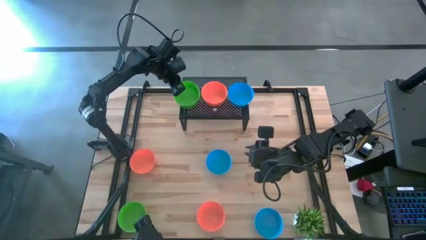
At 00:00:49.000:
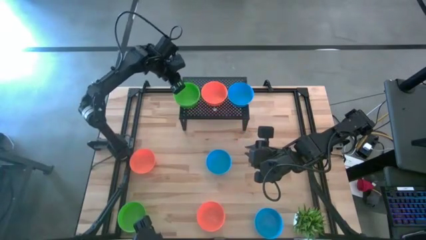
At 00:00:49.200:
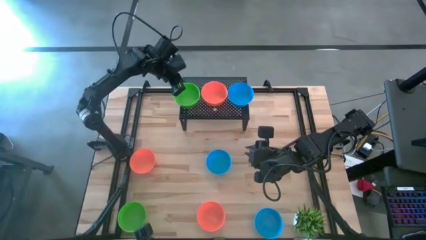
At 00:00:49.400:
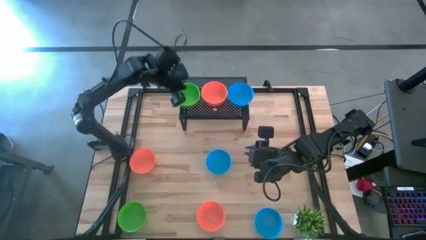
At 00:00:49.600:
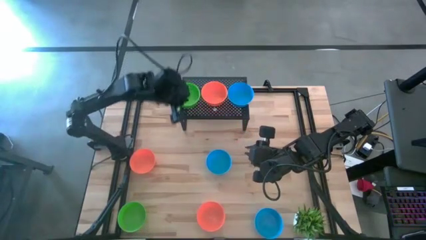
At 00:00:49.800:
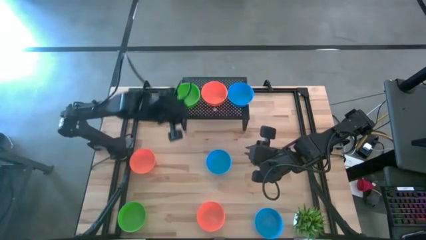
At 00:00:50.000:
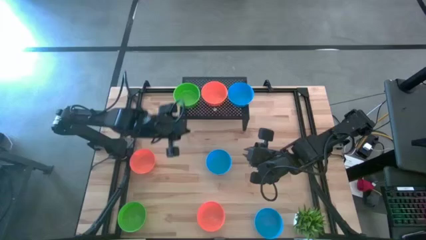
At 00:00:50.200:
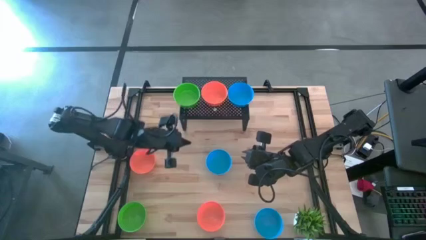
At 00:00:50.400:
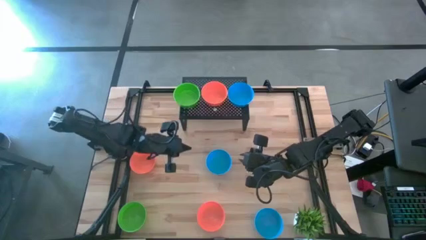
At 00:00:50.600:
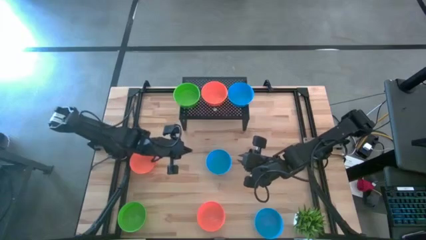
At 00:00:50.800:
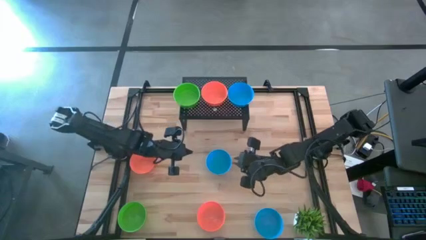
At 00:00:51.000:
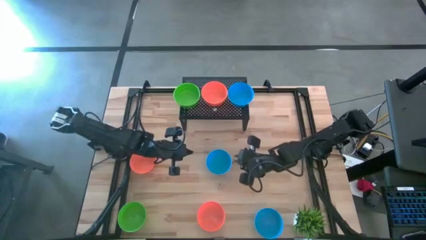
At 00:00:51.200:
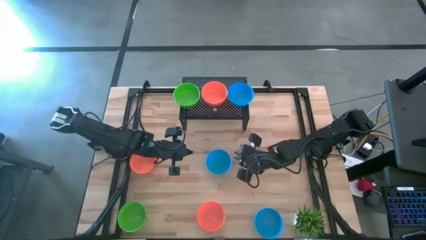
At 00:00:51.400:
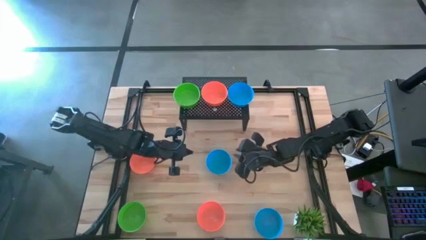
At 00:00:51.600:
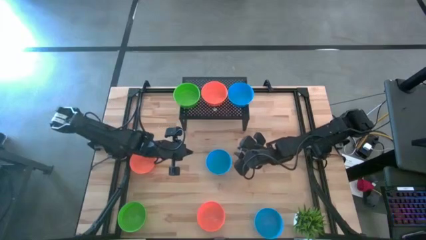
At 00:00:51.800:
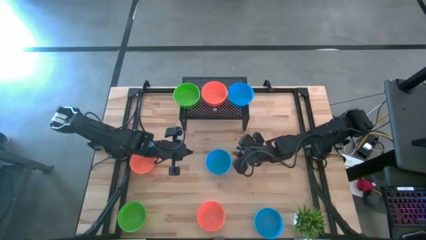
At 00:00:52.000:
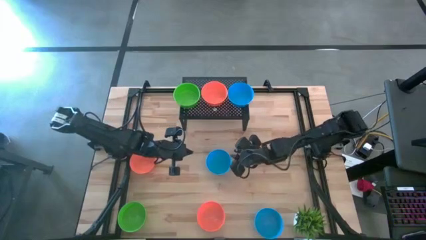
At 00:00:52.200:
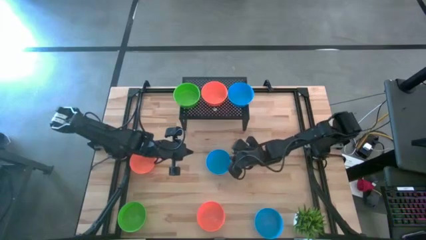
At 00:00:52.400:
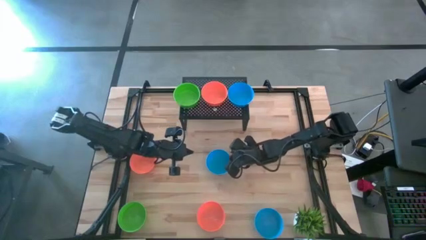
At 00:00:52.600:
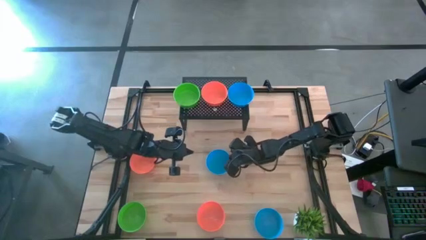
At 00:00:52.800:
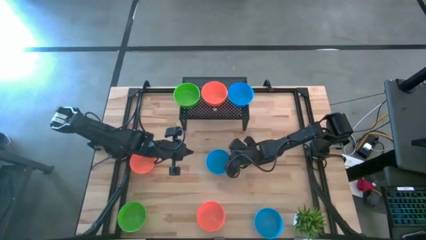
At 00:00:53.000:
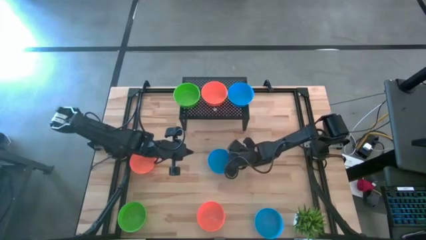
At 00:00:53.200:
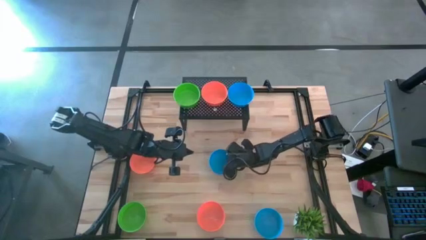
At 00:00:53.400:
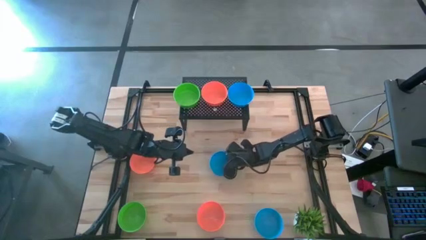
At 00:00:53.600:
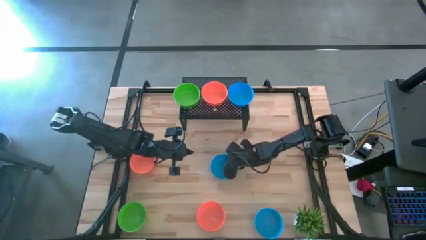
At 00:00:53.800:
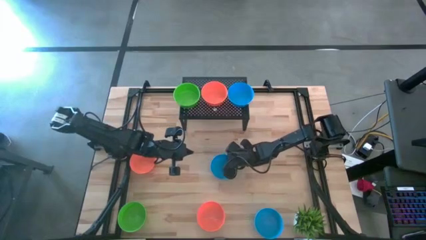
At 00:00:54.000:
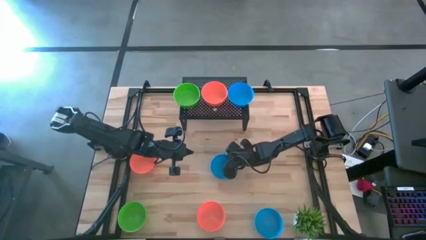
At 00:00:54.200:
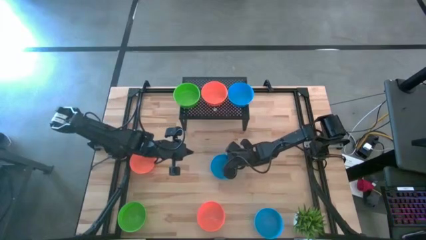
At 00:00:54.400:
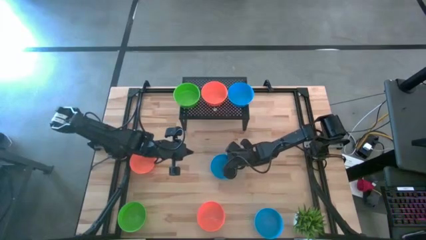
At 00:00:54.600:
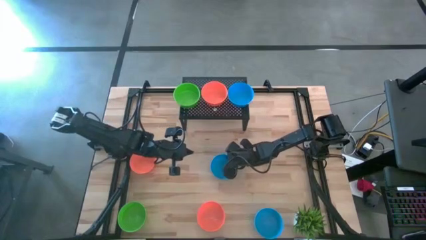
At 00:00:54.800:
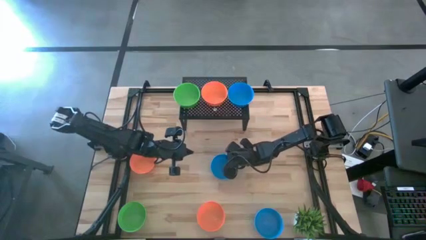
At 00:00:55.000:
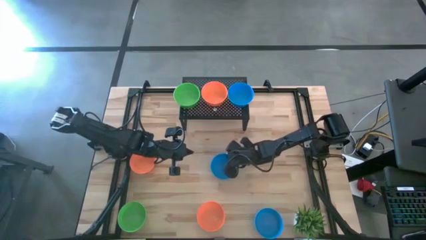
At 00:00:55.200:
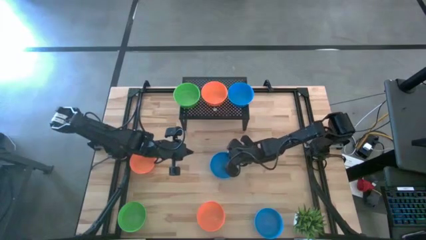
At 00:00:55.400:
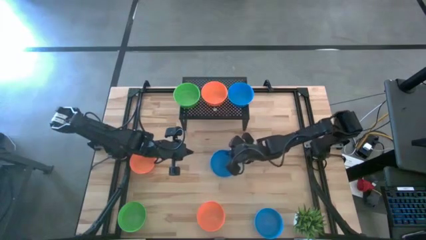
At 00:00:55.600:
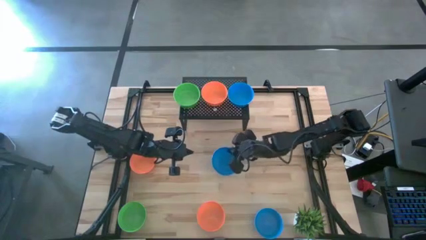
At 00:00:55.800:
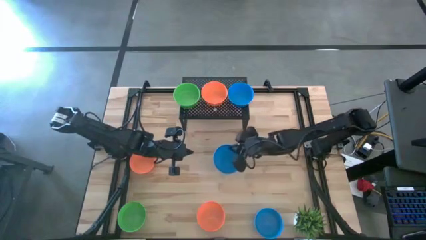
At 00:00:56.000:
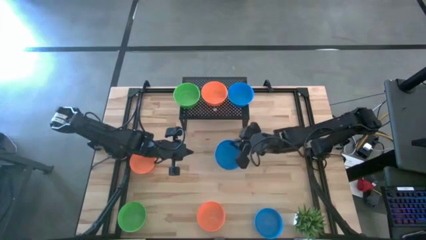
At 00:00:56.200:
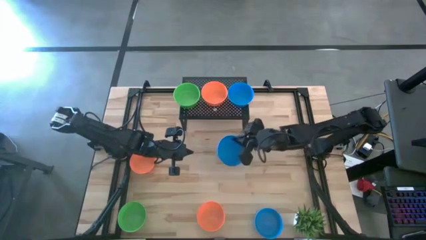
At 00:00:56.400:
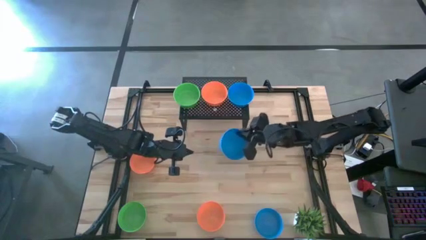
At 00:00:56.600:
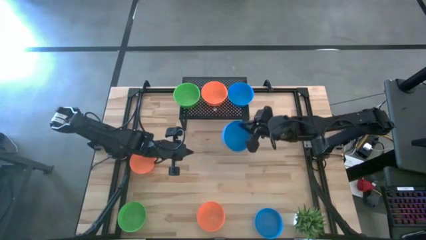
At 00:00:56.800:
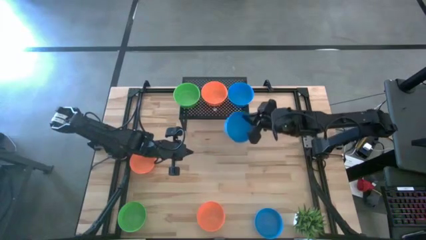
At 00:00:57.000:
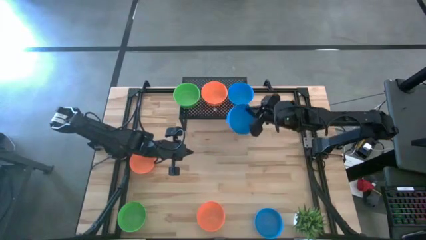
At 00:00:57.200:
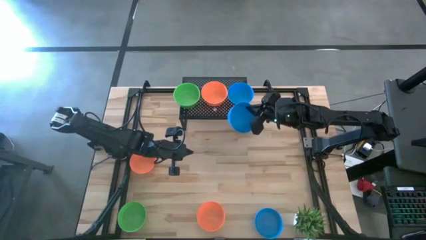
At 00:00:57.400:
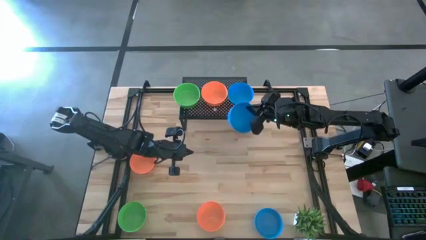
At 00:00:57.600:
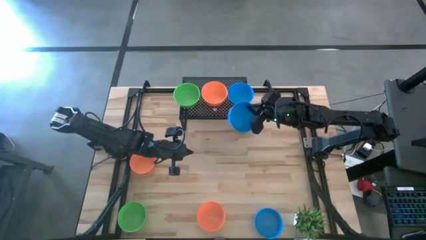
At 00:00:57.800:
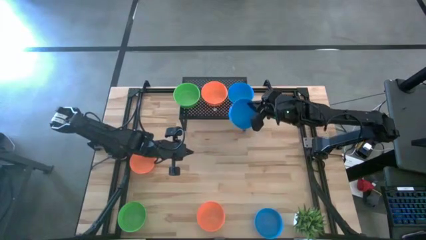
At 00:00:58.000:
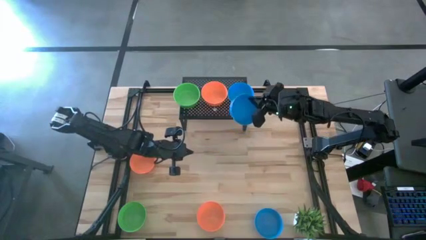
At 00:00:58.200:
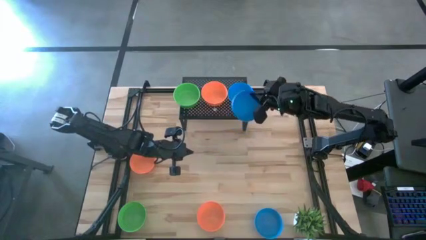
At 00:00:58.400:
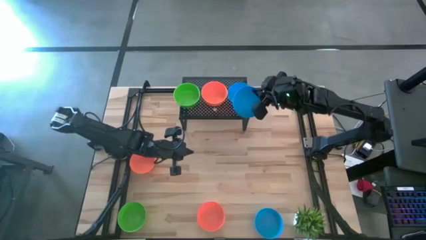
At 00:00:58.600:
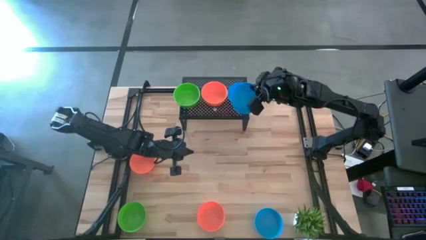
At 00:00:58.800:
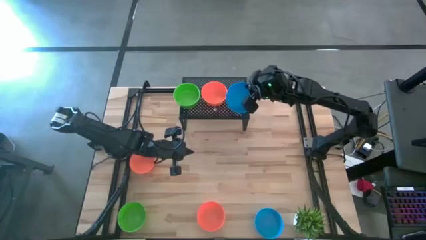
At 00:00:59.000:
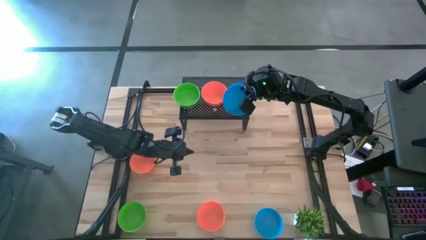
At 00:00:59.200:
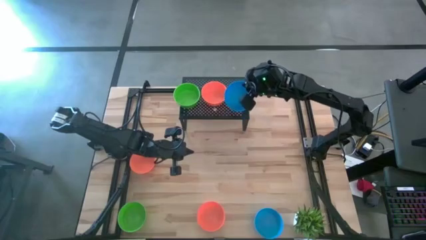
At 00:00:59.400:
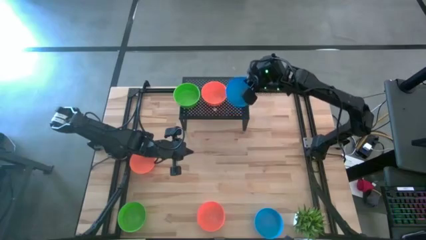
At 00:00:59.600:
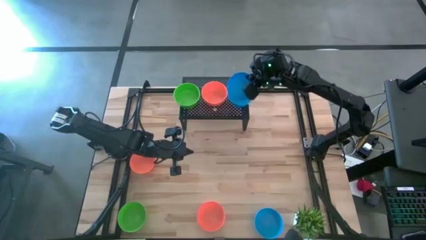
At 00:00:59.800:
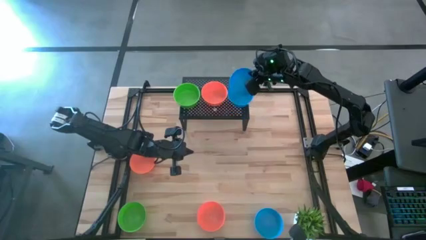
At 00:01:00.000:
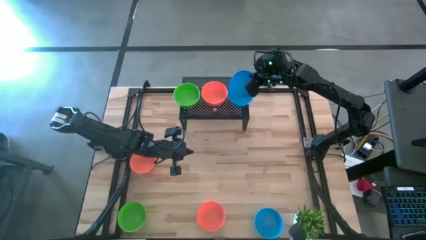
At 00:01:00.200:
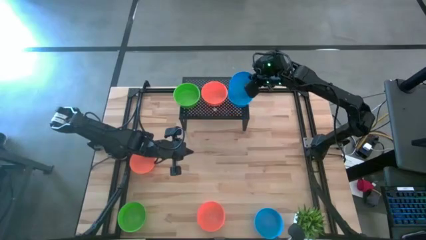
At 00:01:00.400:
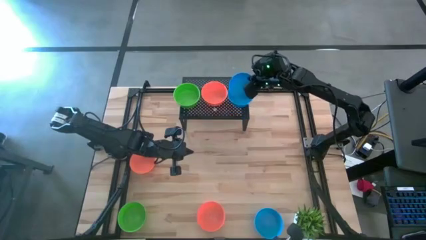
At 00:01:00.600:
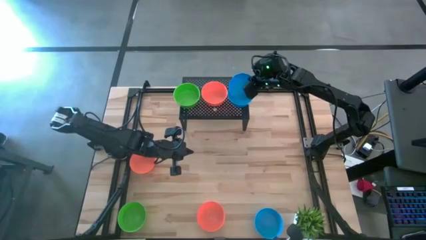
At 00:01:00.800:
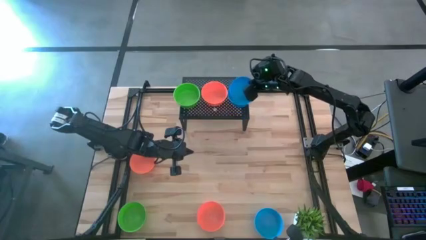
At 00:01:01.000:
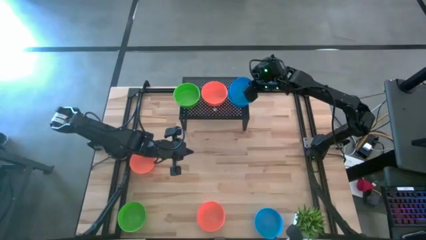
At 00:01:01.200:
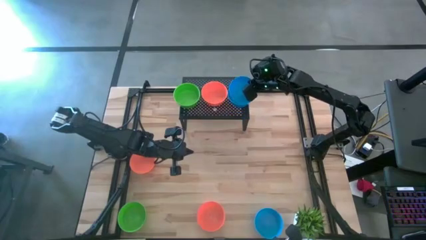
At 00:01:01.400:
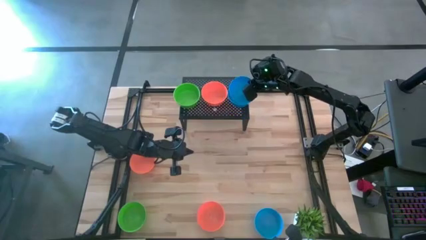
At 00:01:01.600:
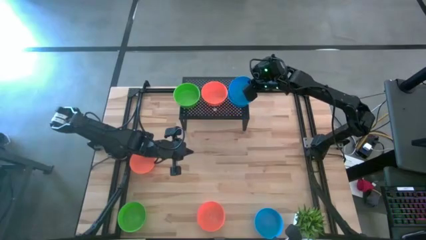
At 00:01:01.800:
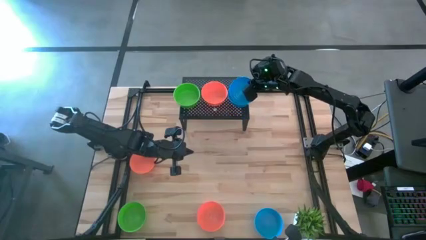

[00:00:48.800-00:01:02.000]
Task: Pick & Place Mini bowls
Stack the top blue bowl on the blue bowl on the shelf
